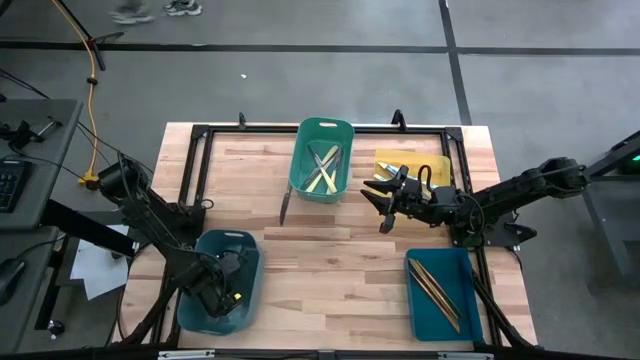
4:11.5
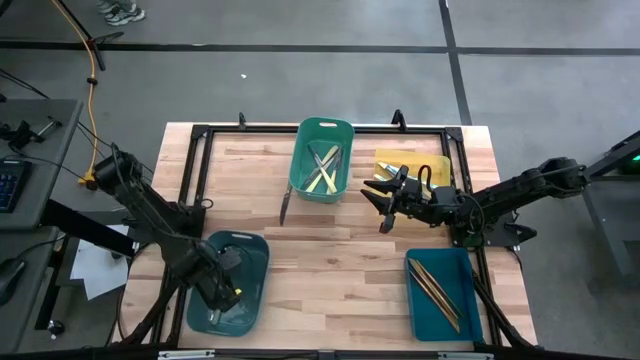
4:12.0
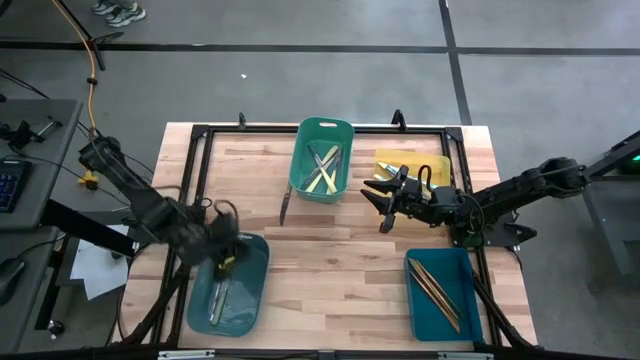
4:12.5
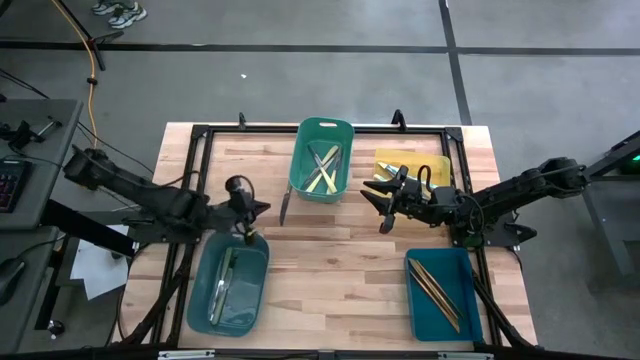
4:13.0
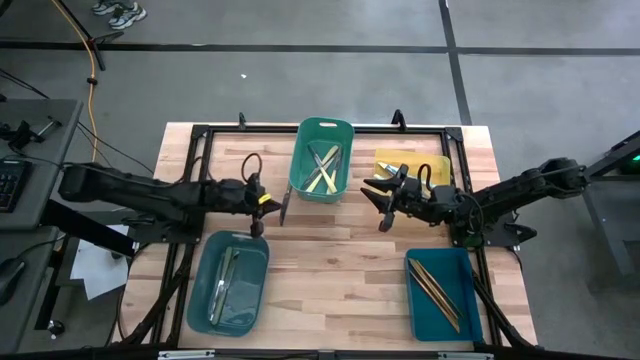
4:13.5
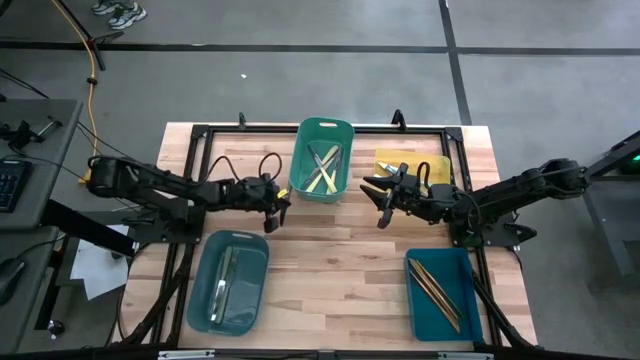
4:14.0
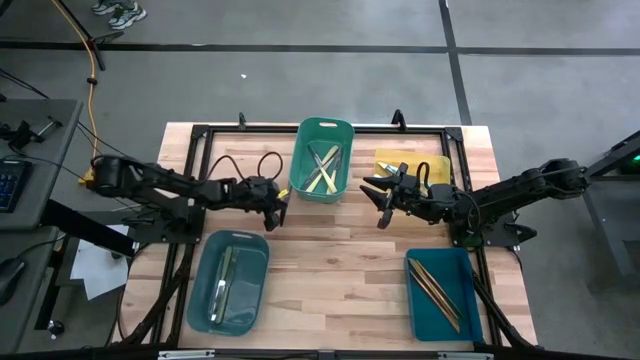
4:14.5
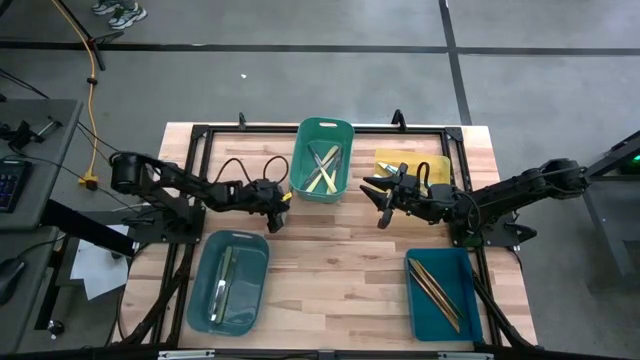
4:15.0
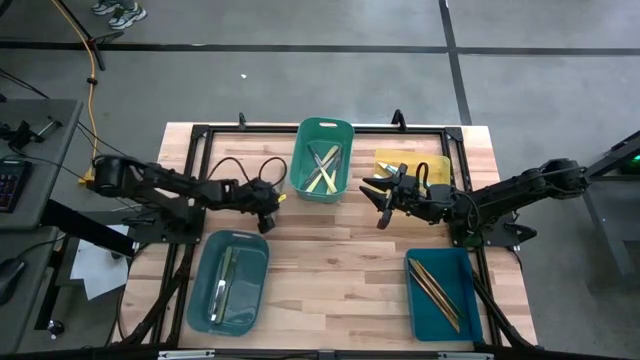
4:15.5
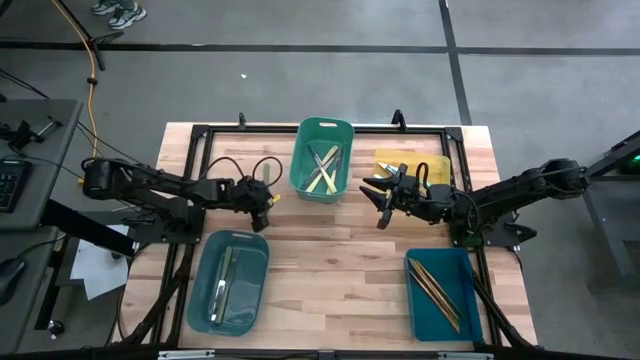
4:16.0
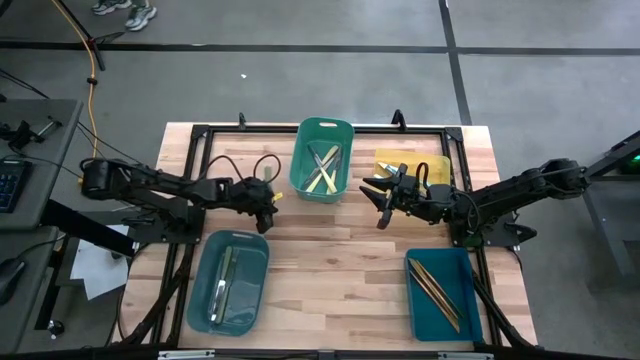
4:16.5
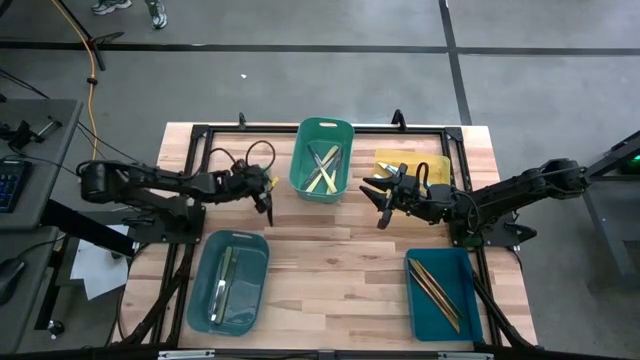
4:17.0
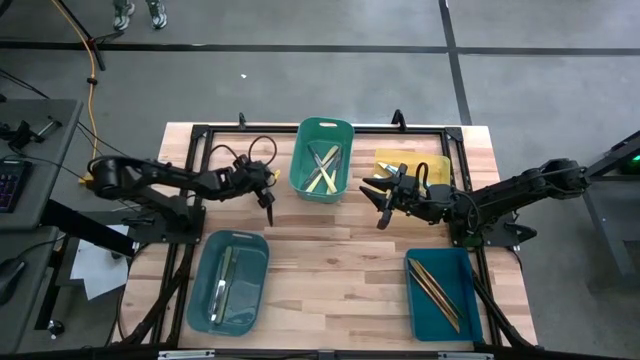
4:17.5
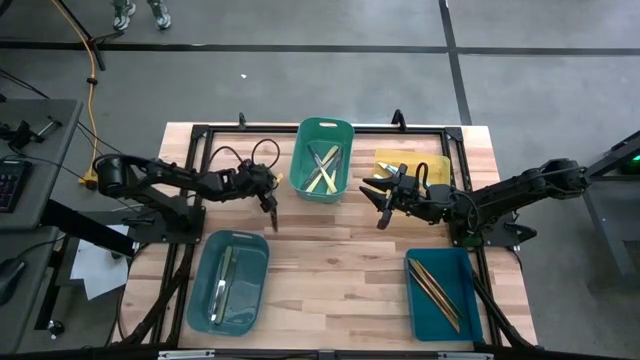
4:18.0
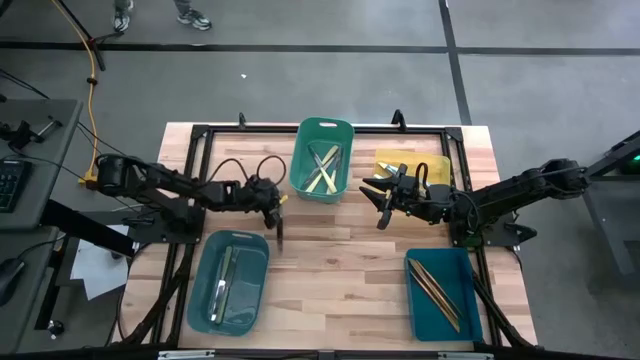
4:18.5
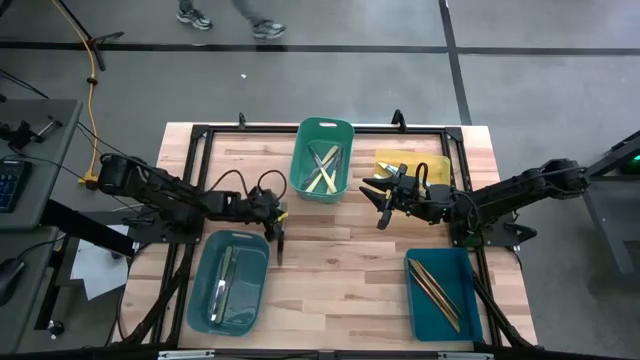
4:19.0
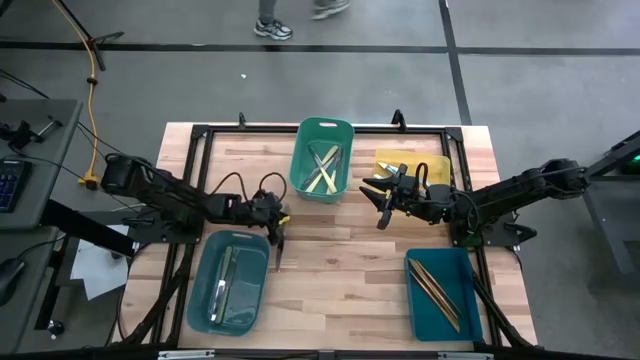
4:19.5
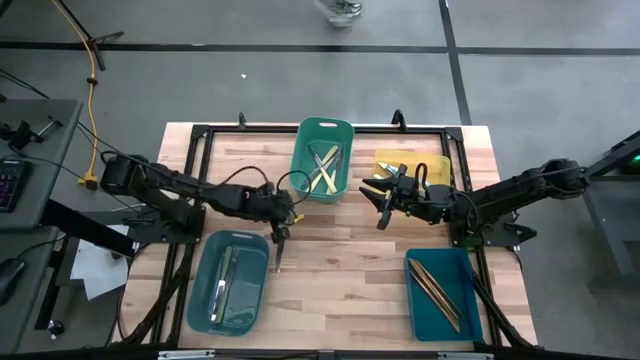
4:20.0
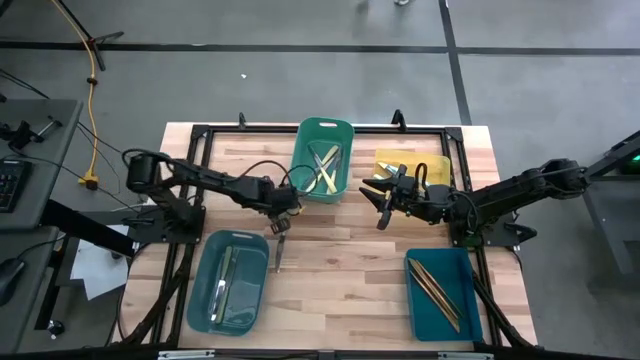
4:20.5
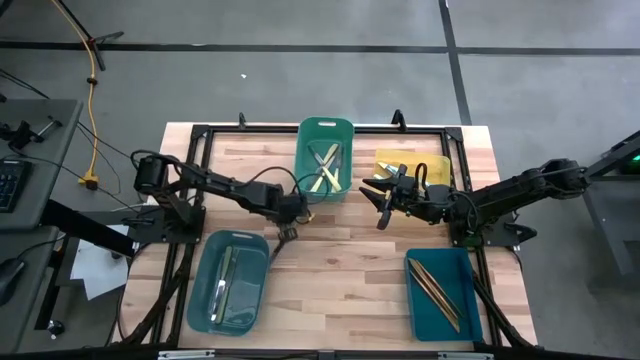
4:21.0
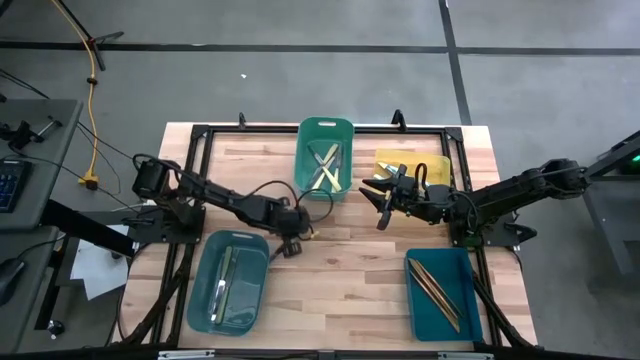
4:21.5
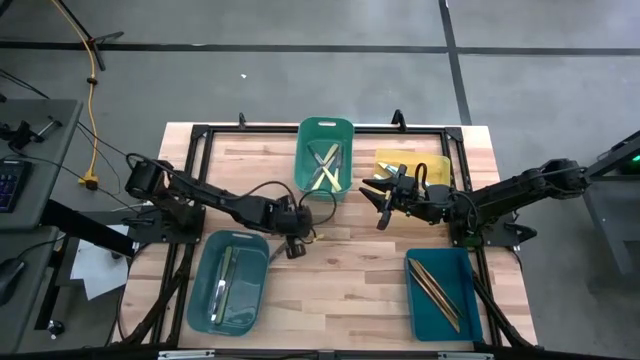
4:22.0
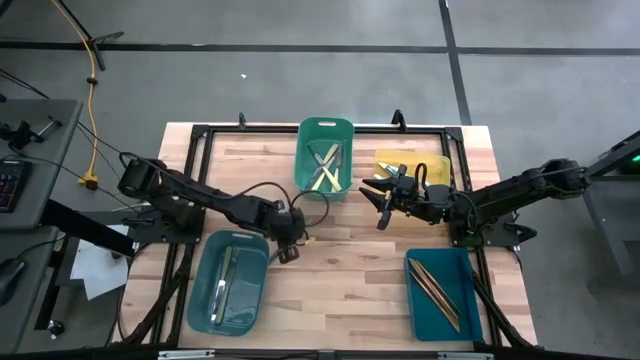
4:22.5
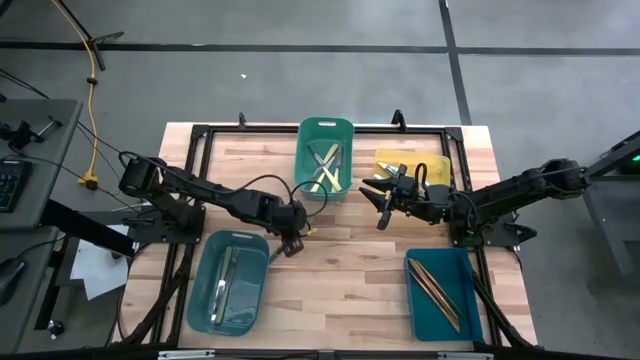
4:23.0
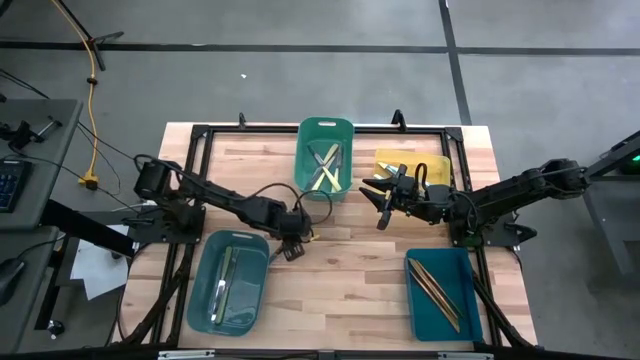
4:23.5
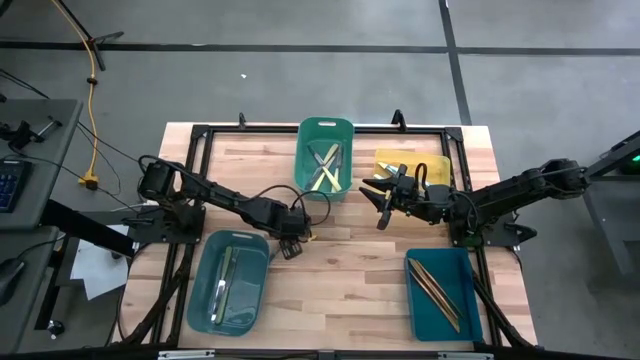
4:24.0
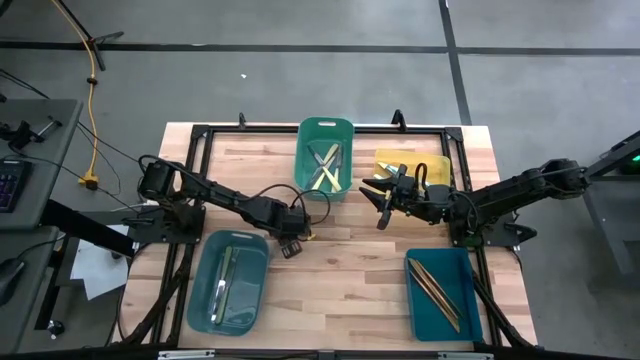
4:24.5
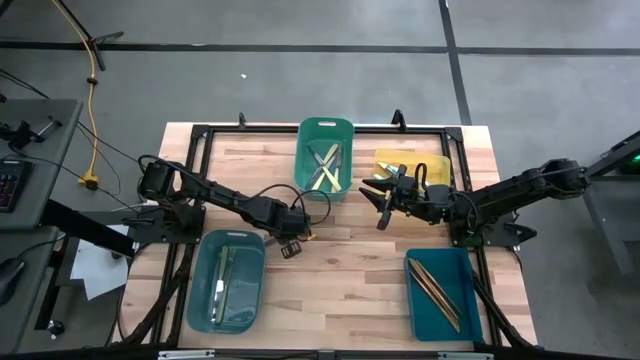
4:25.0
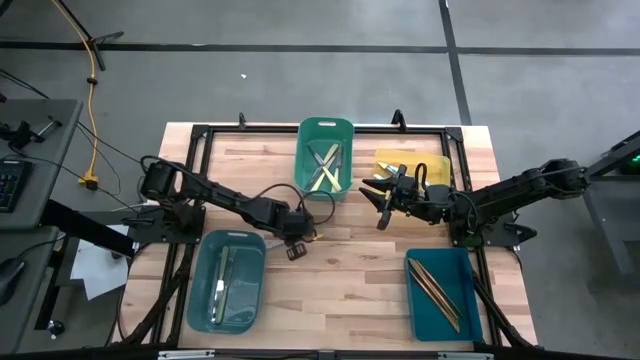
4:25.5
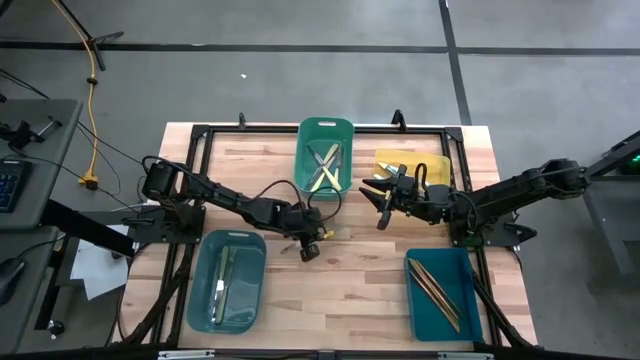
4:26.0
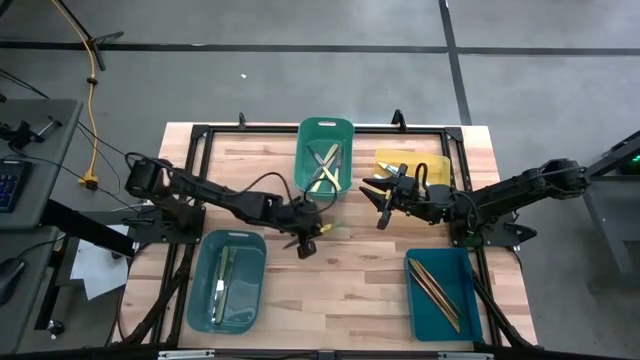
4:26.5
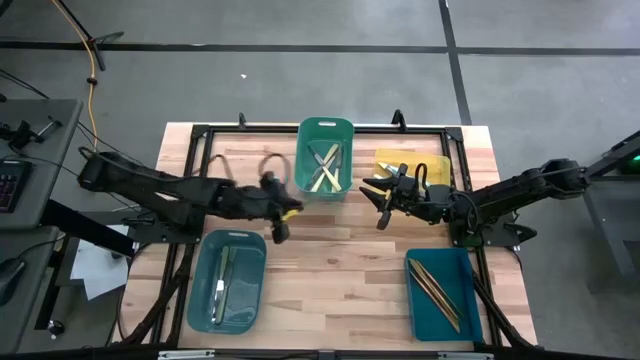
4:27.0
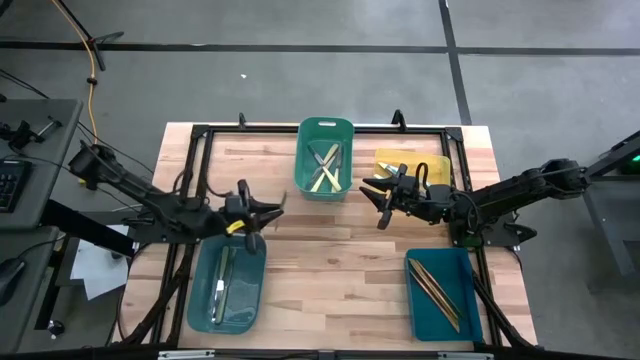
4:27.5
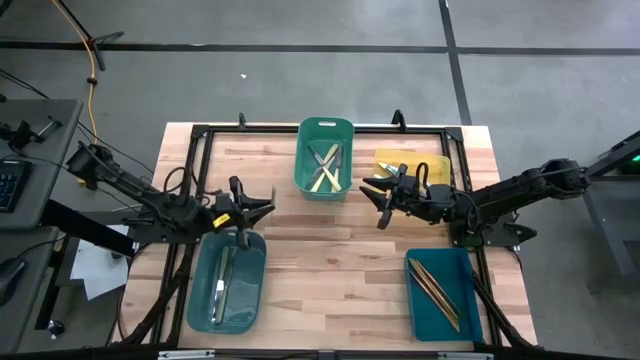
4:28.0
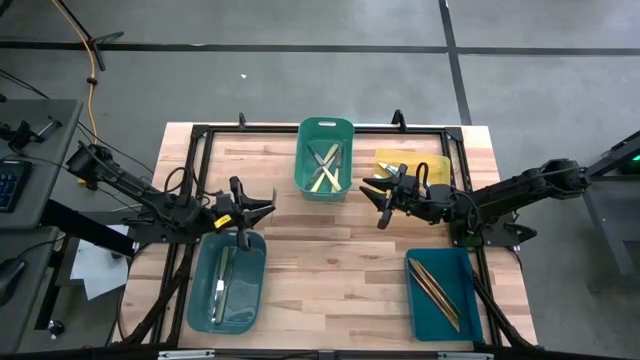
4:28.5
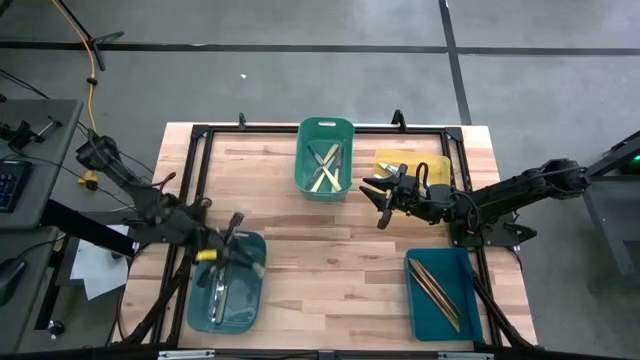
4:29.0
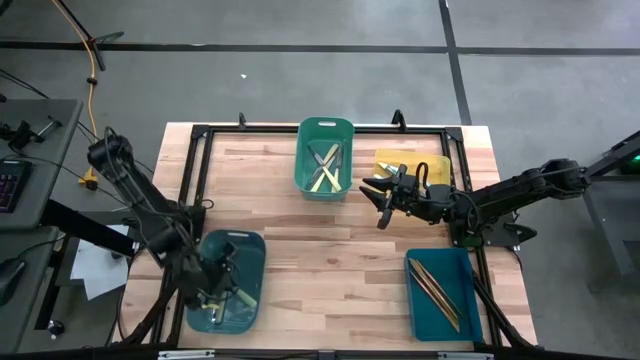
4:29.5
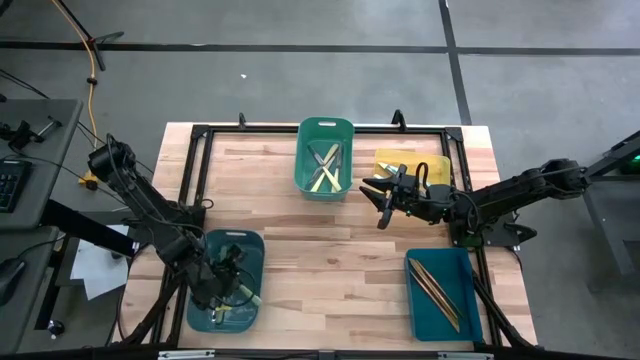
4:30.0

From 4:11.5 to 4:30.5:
Task: Sort silverware by color (type)
Put the green knife into the left blue bin
